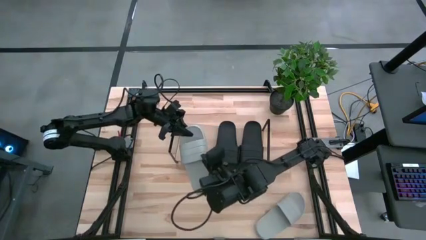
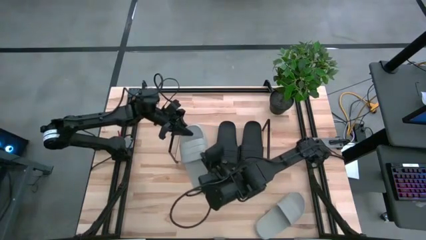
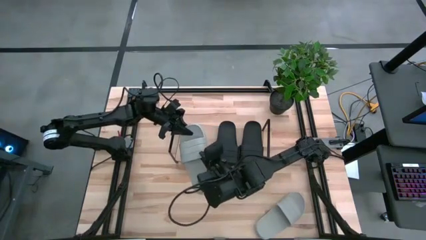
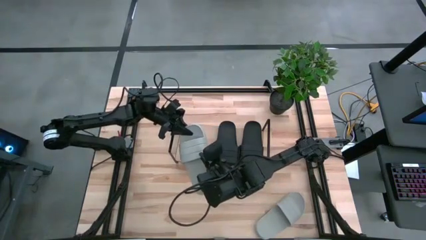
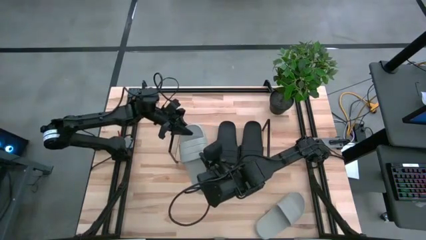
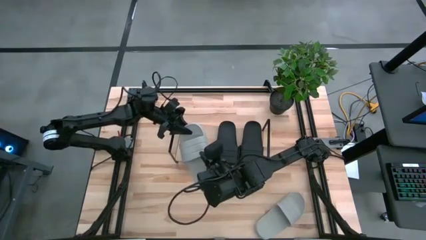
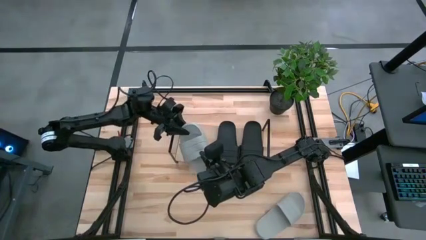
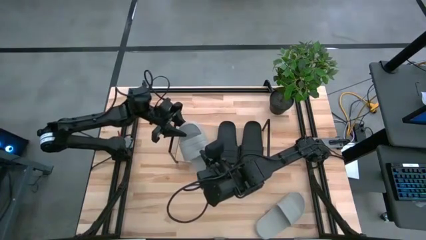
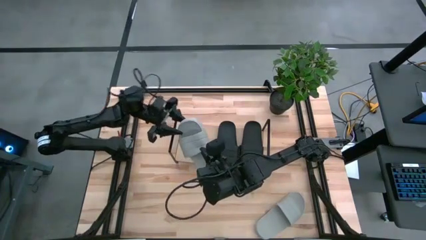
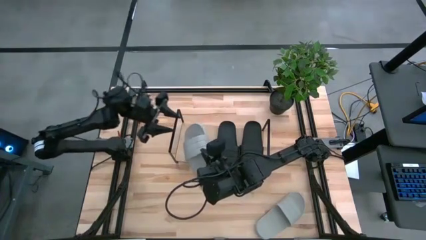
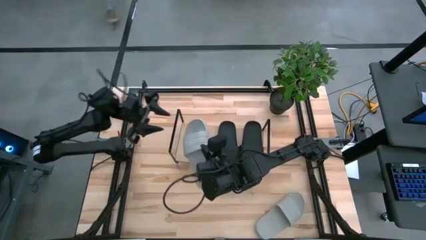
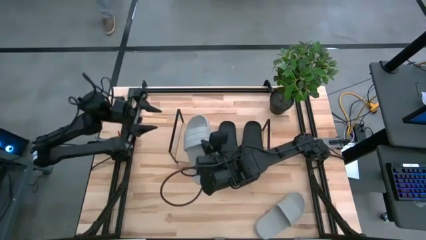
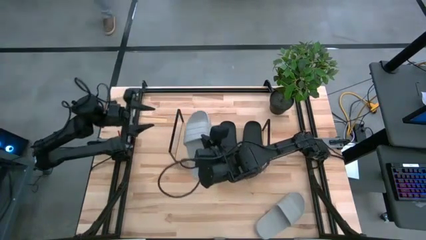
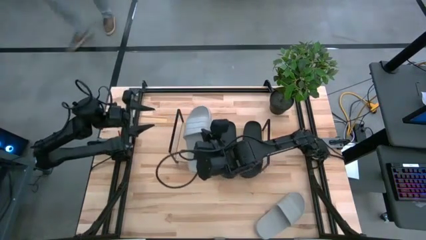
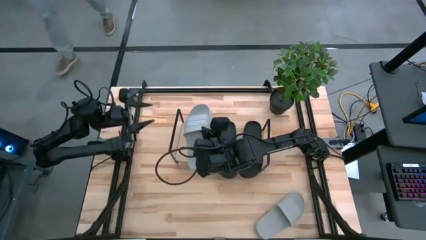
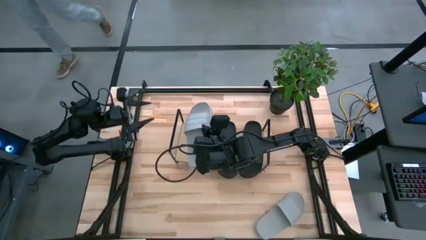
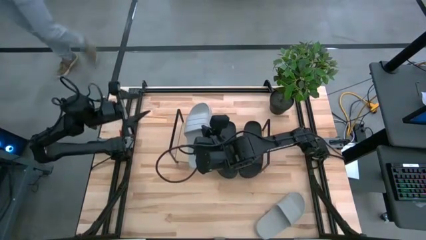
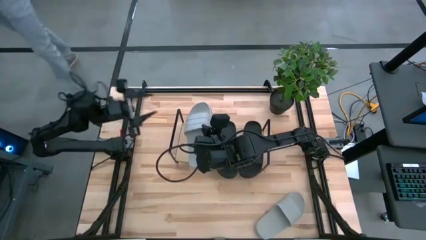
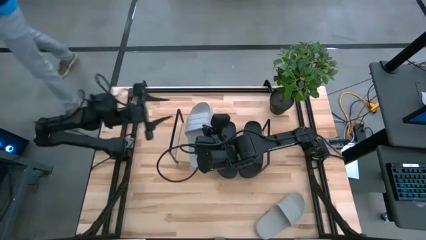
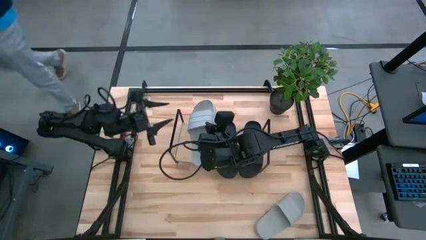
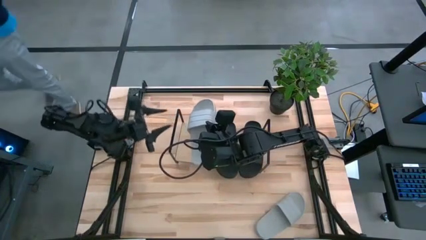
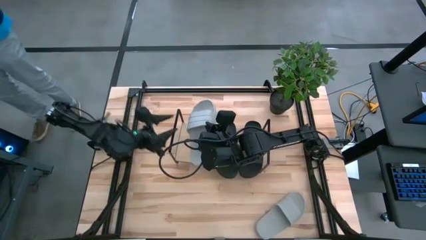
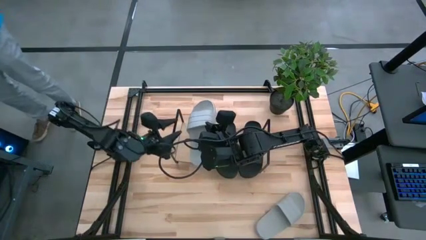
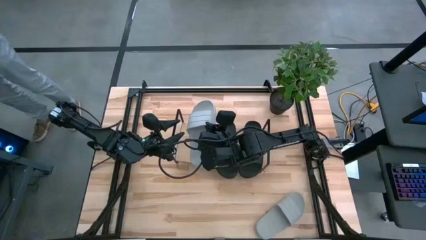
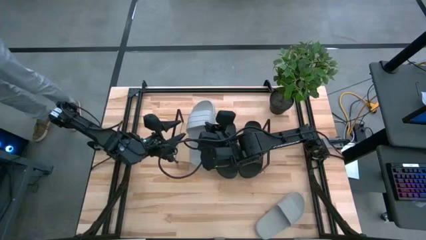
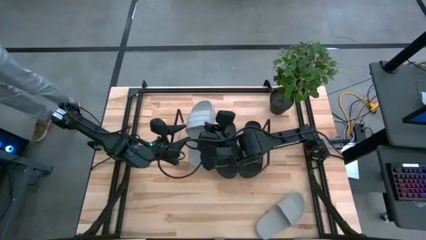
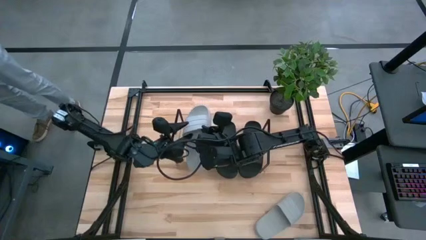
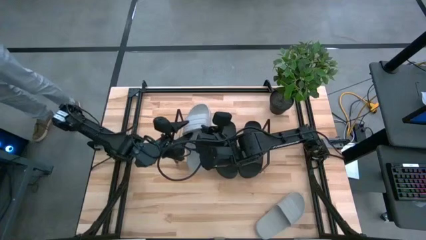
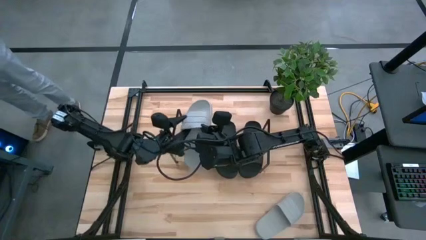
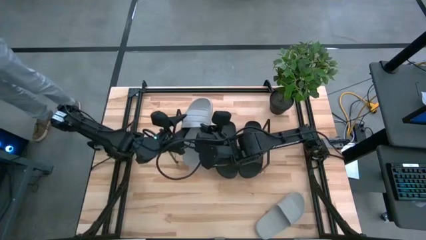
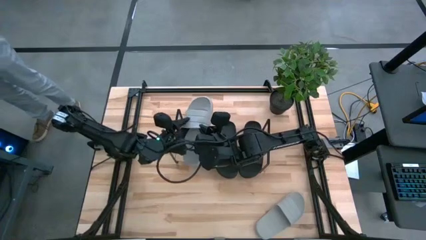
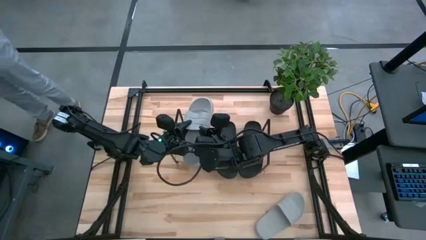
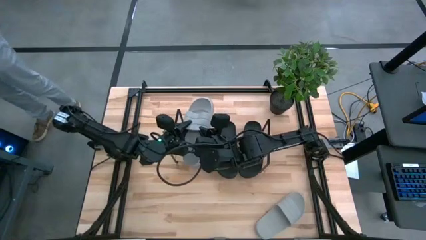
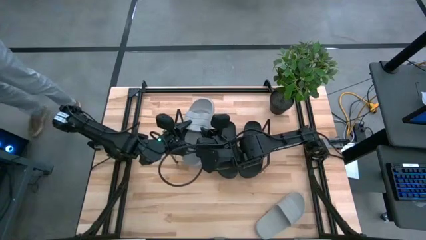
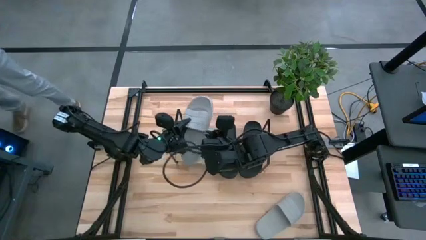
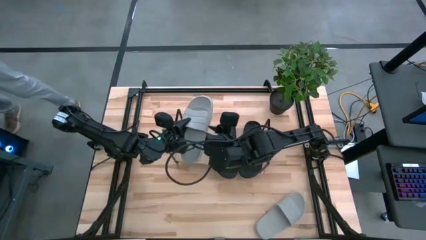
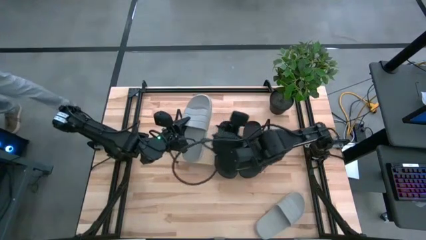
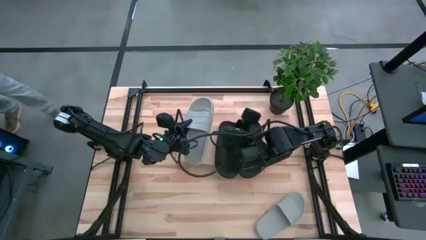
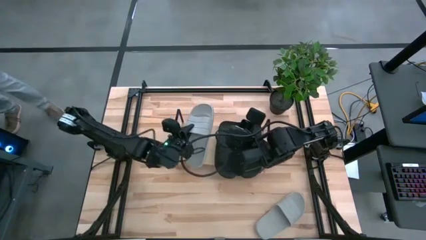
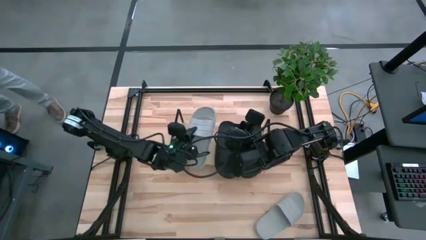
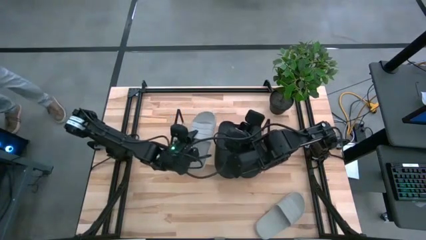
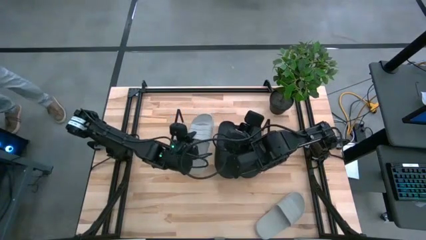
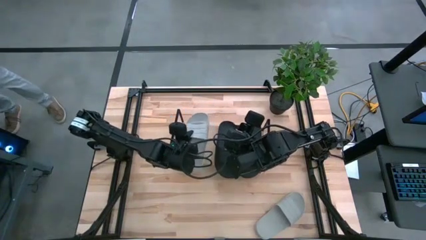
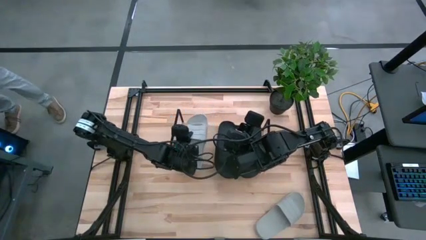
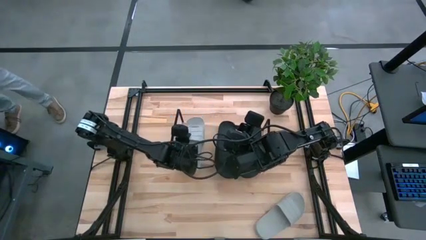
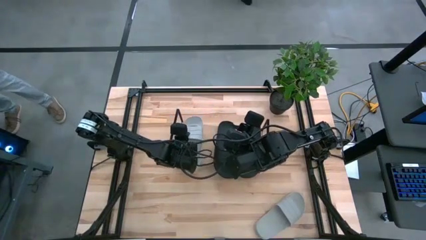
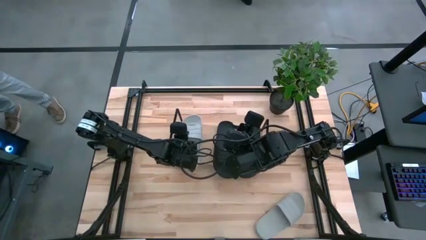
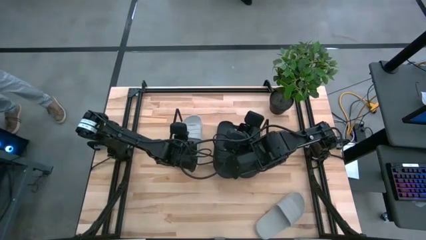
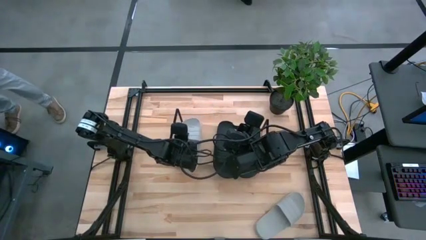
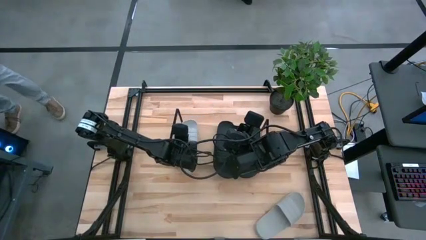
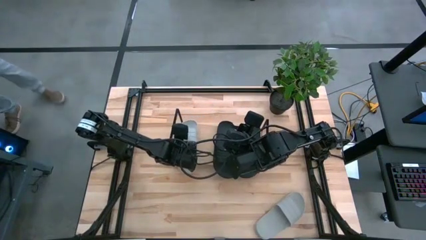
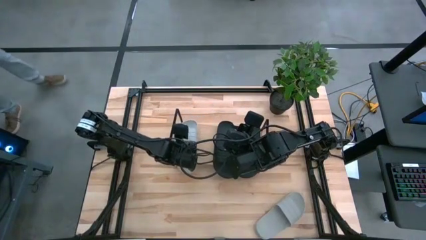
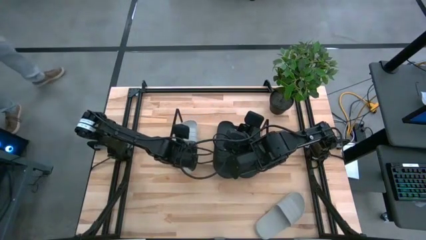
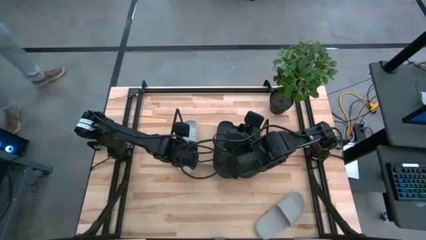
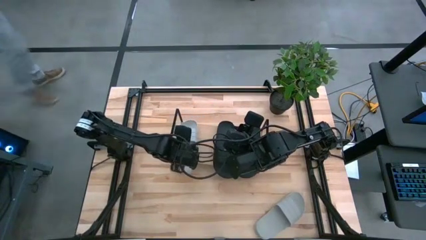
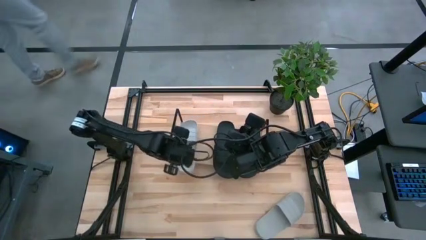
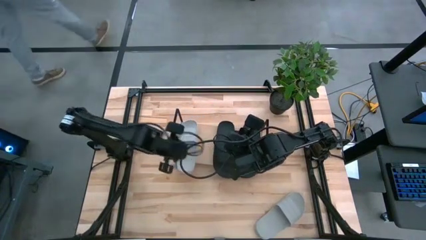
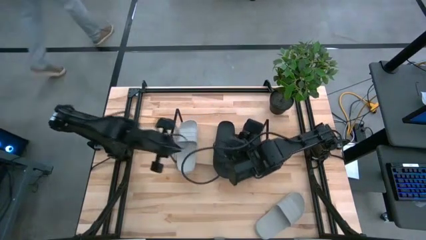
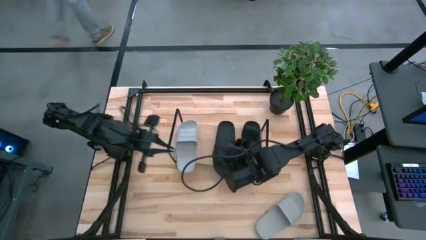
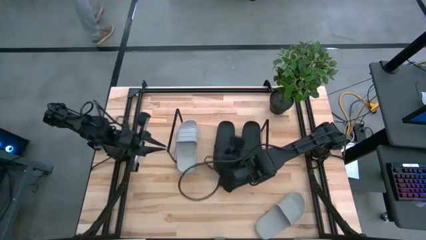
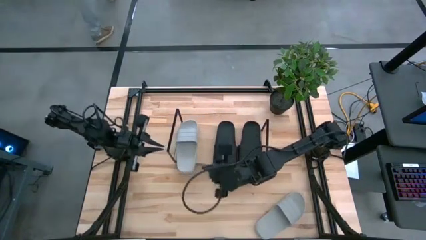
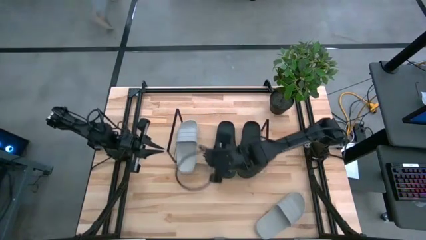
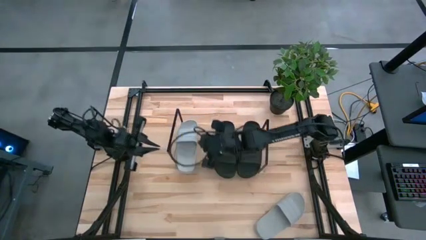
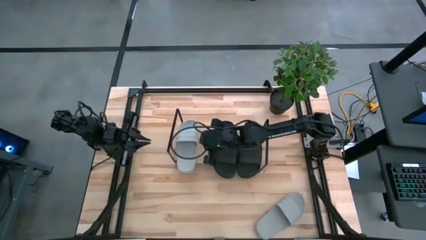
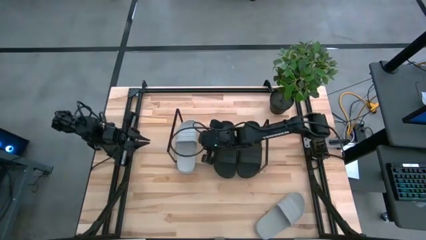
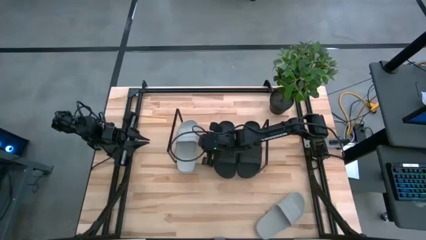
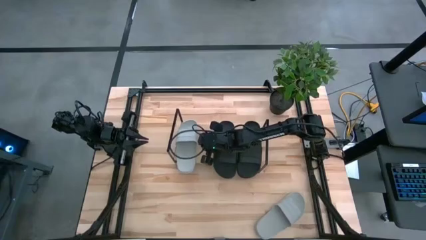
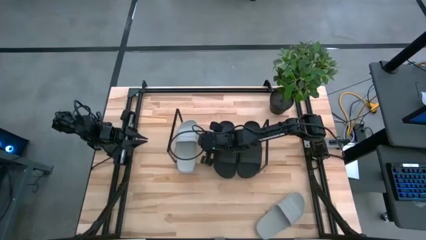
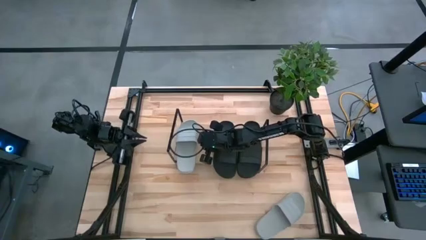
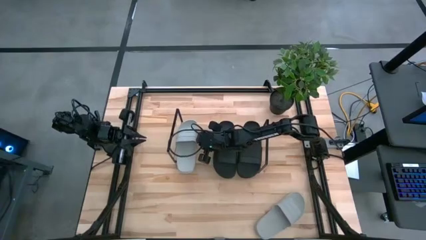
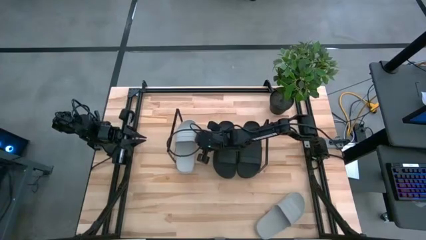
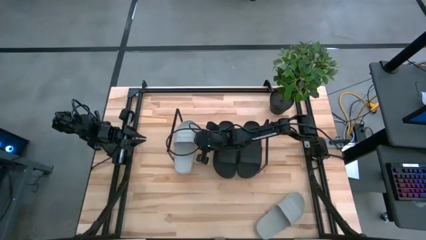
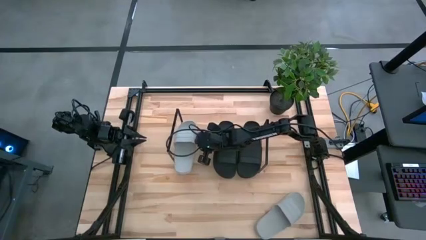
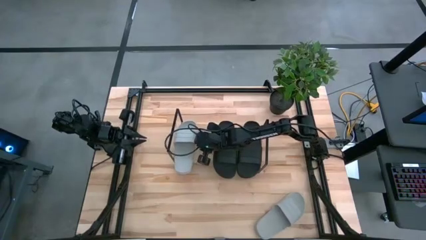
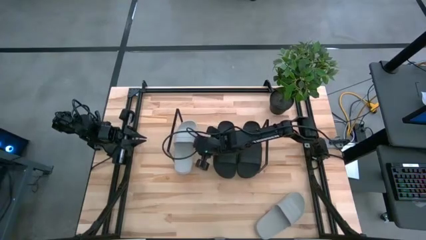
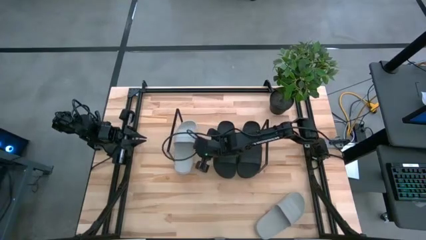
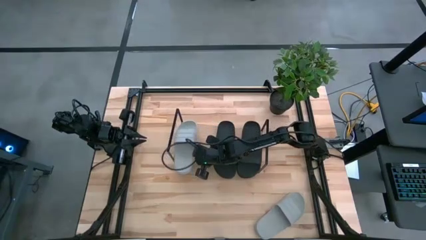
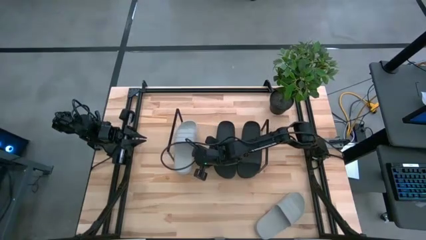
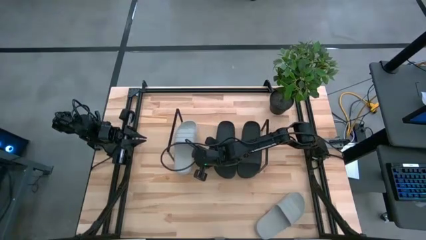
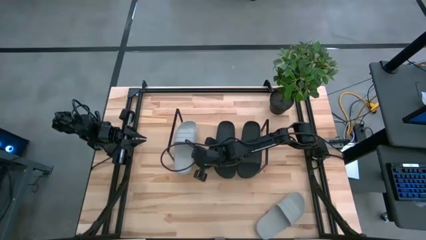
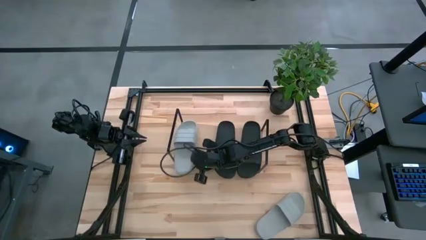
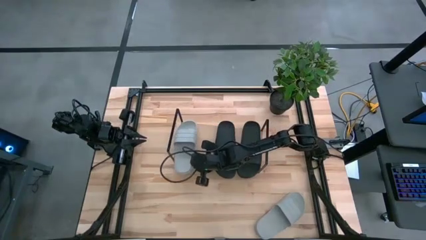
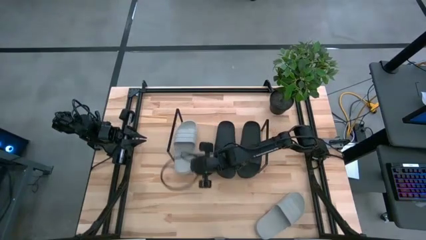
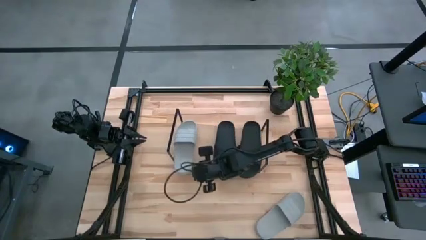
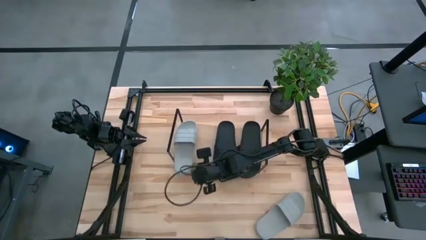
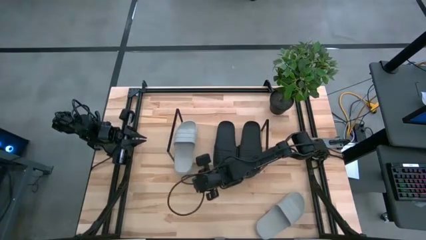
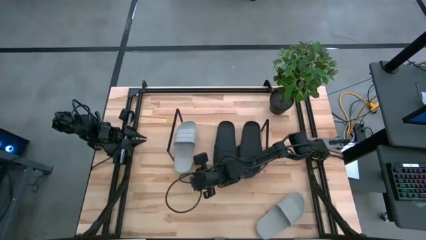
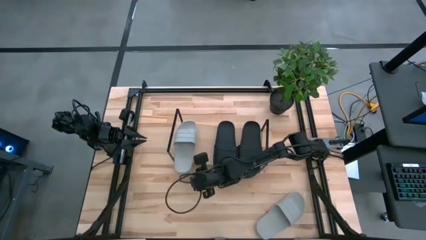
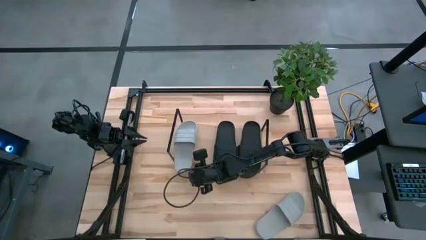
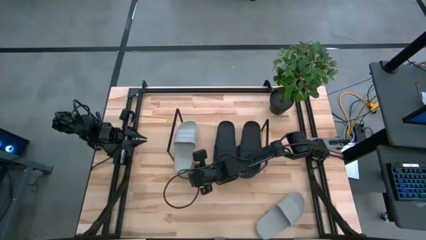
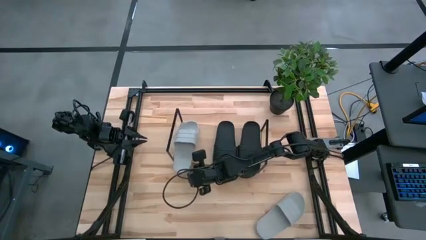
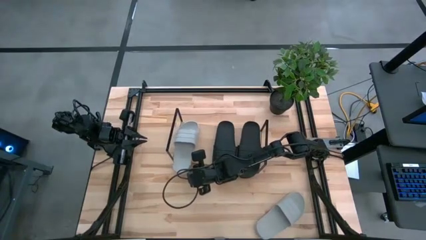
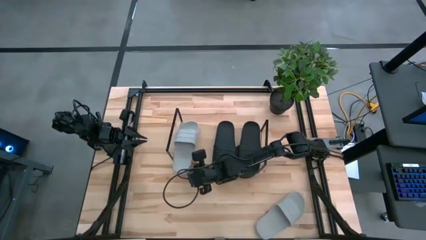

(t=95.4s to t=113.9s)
Task: Pick and place slides into the shelf
Put the left gray slides on the shelf
